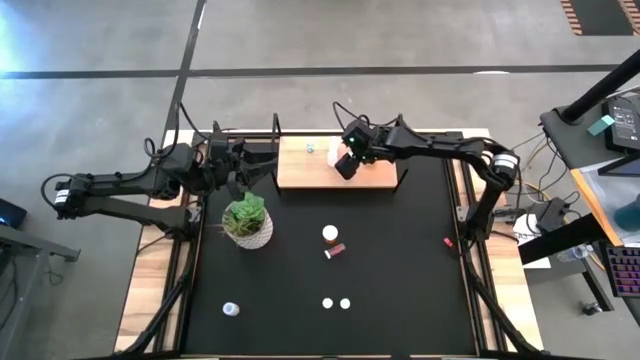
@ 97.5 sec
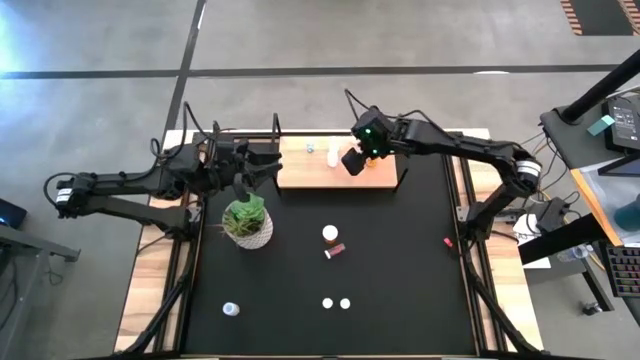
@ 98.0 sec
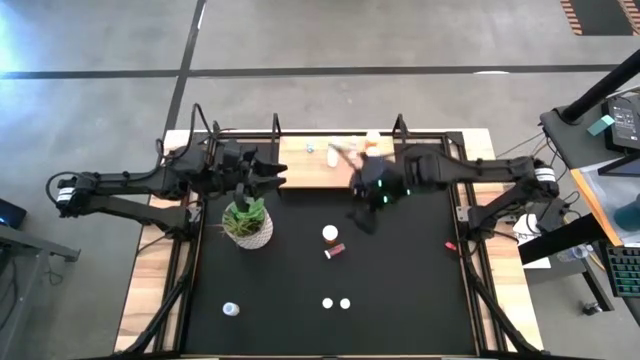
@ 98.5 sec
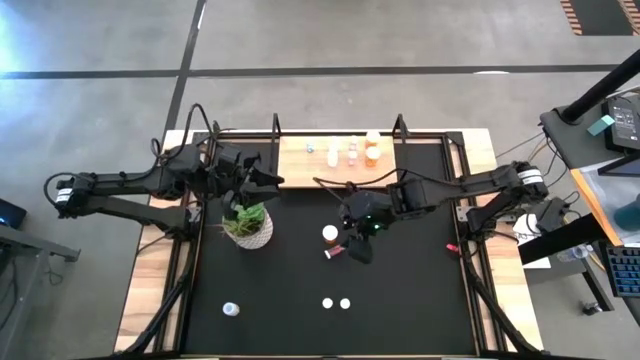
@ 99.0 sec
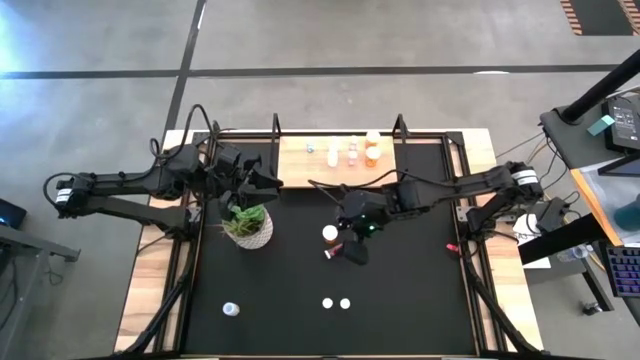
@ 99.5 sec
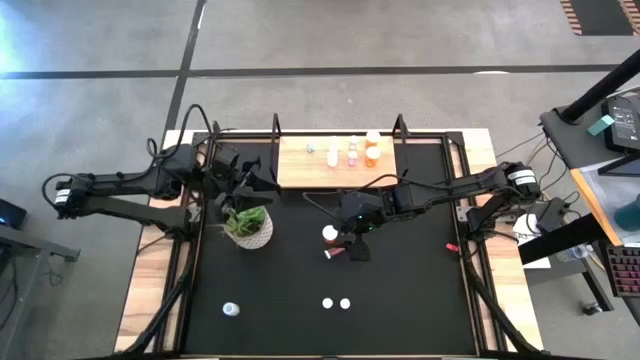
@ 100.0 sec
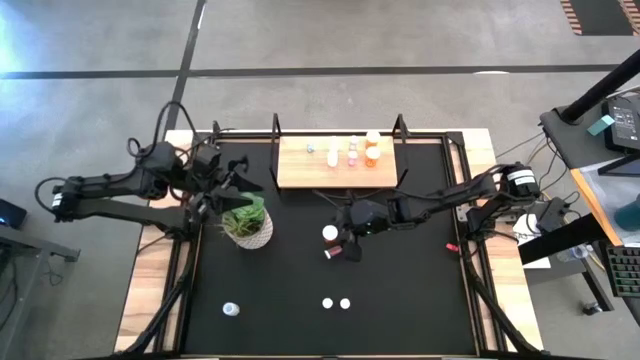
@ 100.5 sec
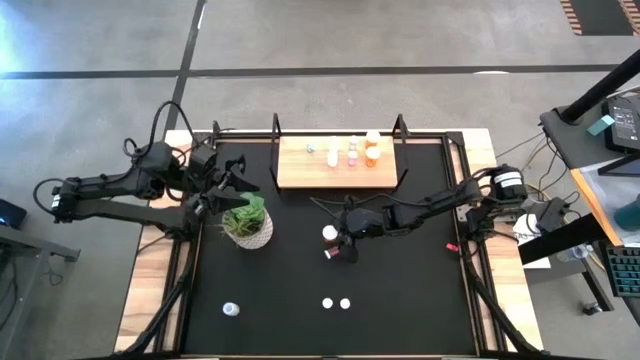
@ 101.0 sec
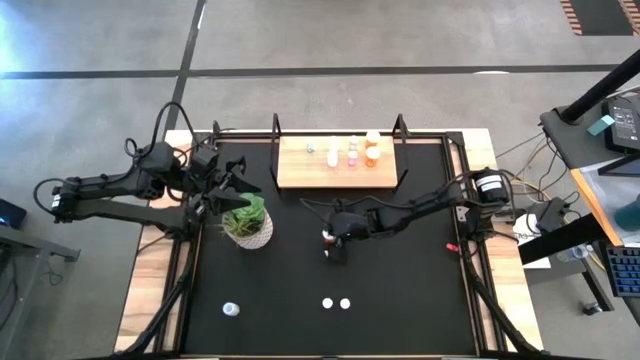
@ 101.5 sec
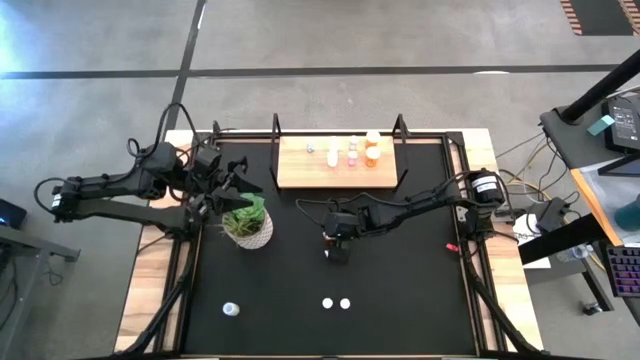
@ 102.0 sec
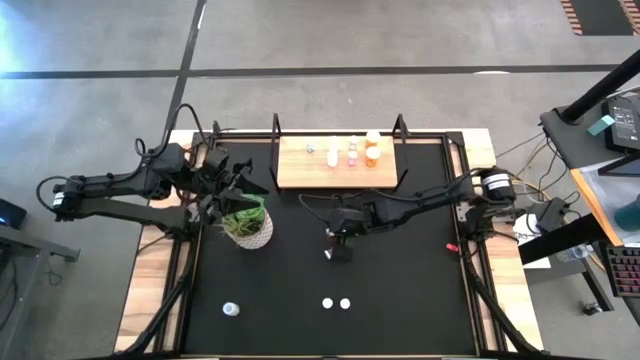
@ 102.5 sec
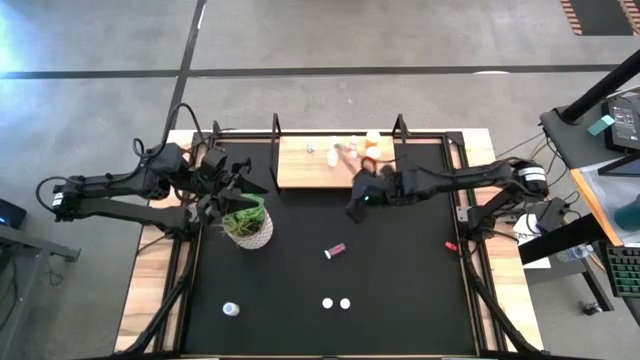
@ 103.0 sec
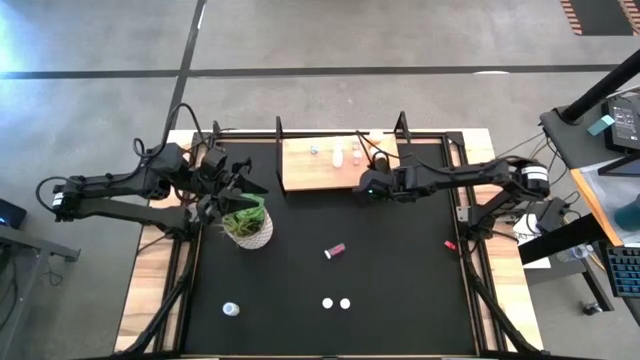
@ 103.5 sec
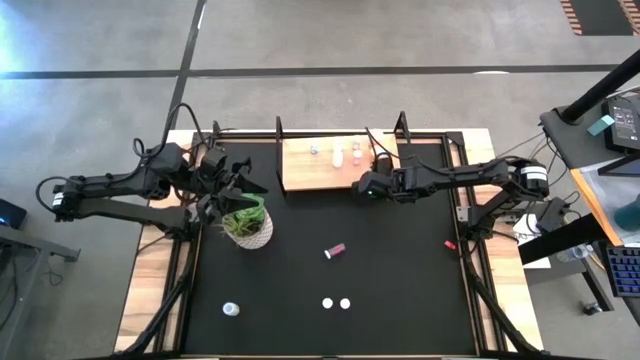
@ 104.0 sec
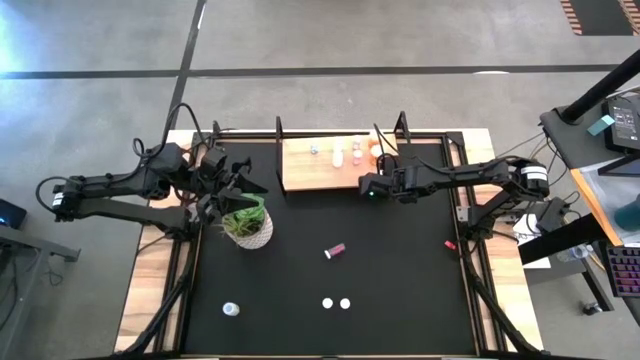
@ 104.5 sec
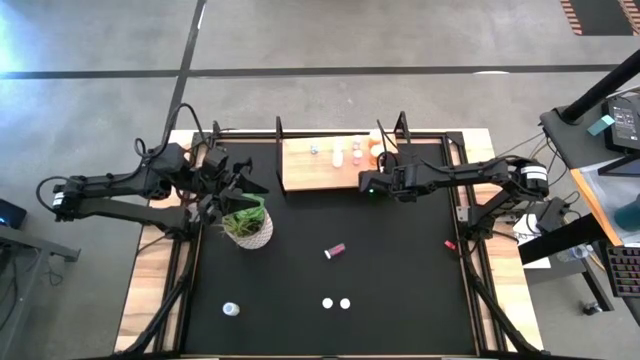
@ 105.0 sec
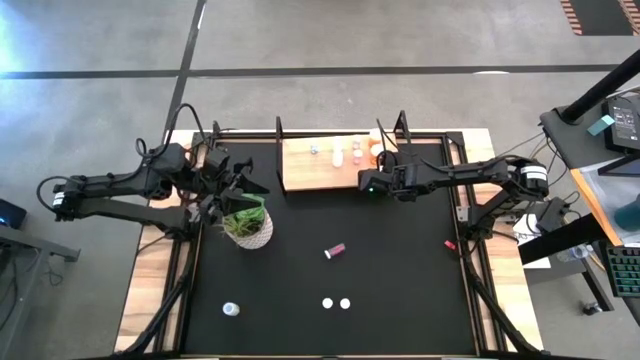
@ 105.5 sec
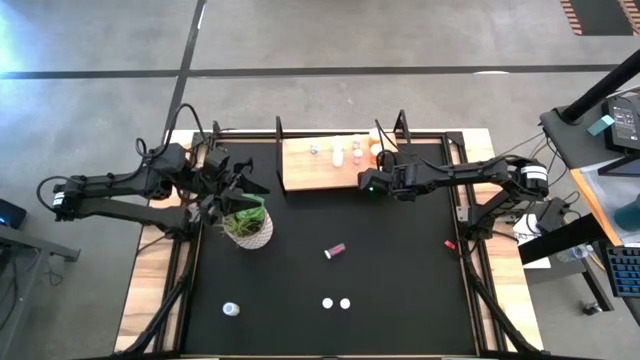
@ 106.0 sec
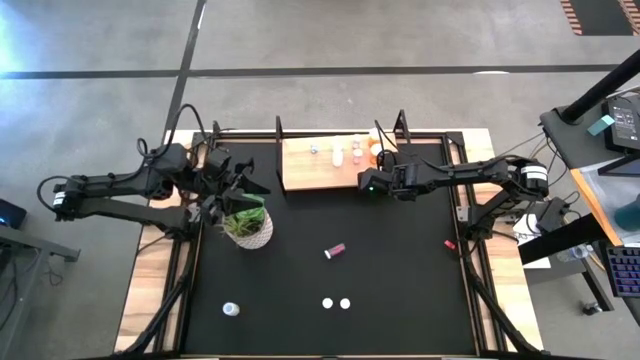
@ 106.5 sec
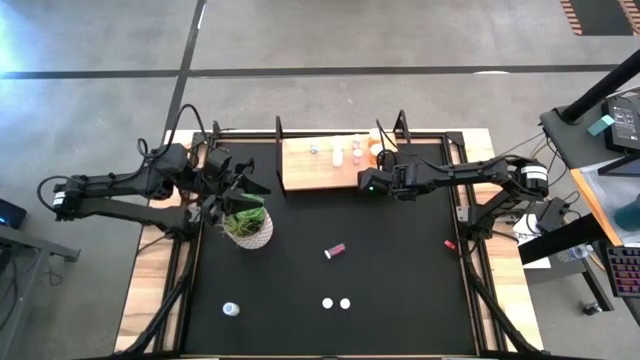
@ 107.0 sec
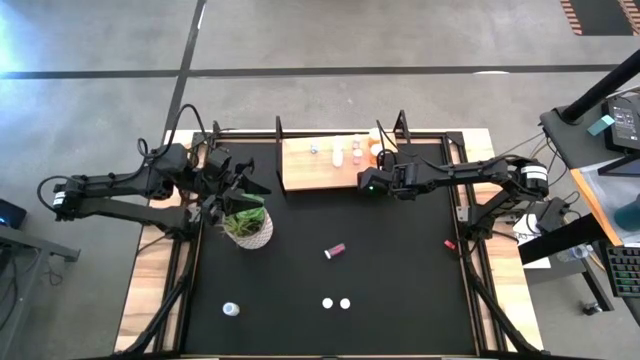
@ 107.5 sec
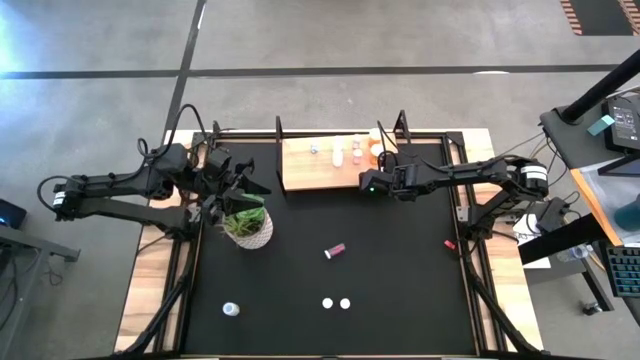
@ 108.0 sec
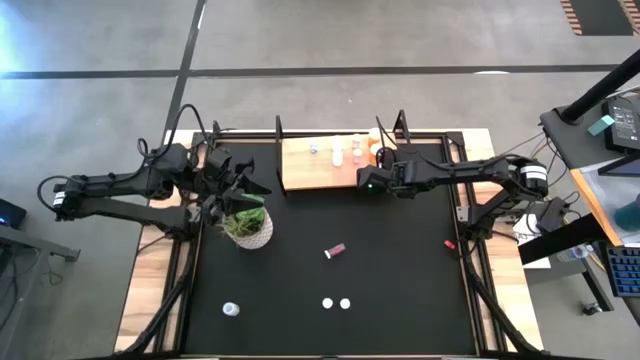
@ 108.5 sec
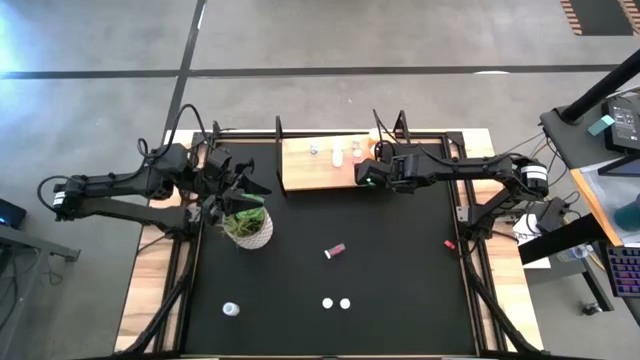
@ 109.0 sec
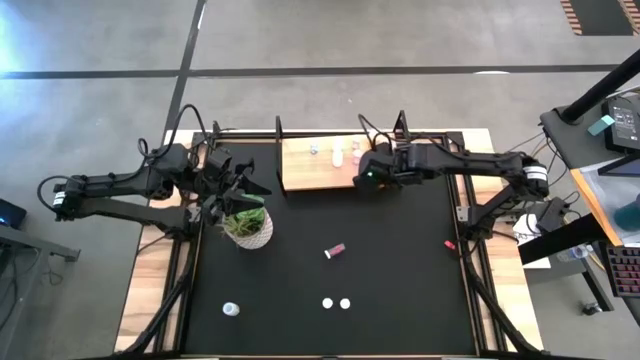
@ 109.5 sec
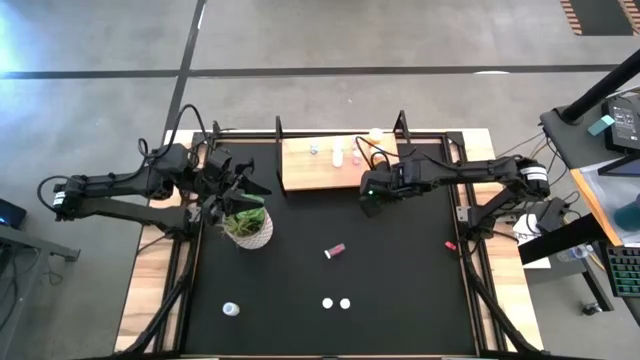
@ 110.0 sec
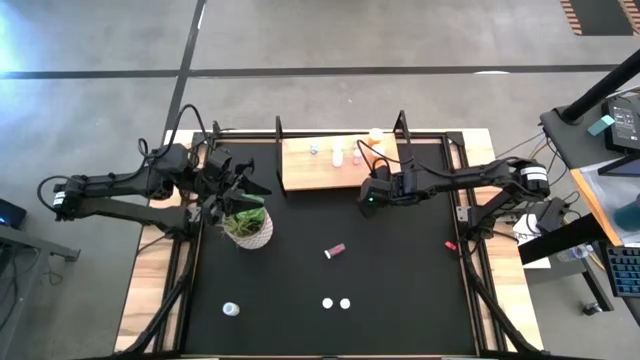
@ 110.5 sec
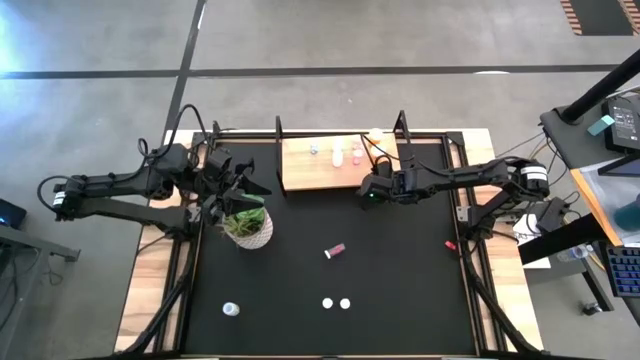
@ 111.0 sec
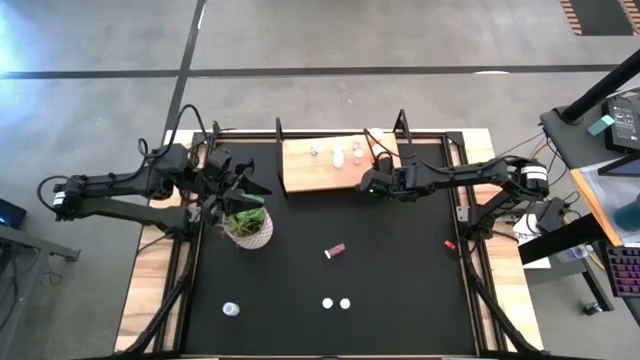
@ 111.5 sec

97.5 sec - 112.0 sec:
Task: Pick and place medicine bottles onto shelf by color
Put the orange pill bottle on the shelf aligned with the other orange pill bottles

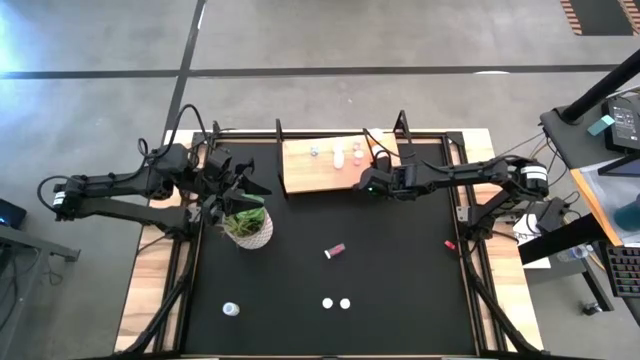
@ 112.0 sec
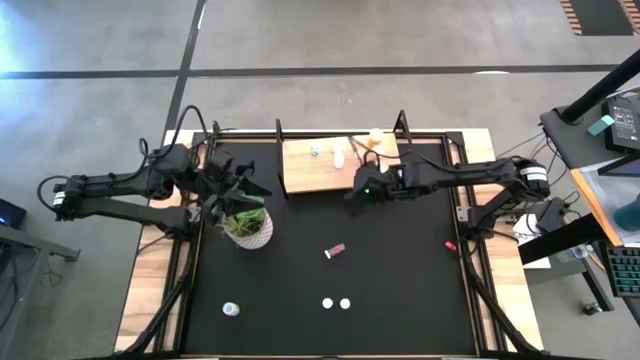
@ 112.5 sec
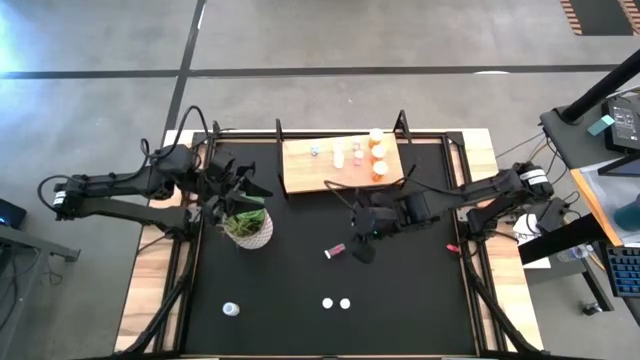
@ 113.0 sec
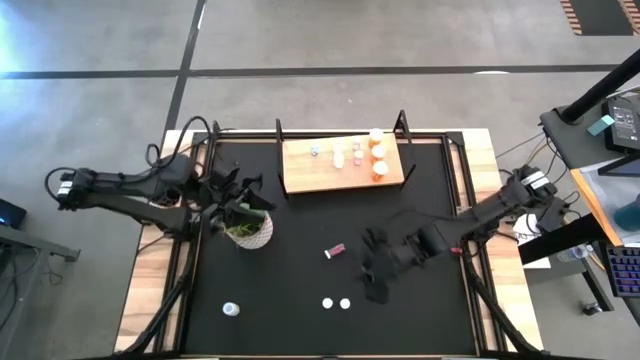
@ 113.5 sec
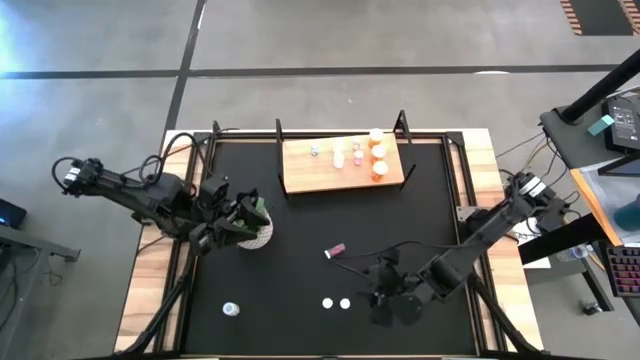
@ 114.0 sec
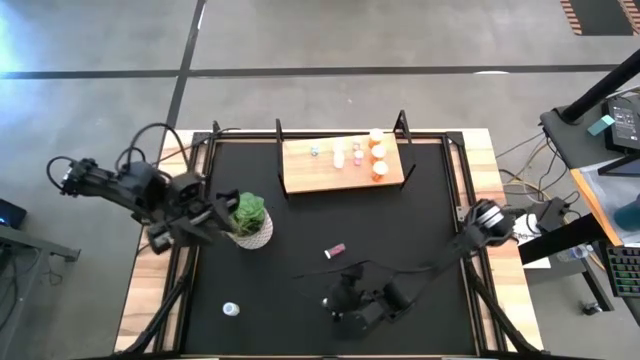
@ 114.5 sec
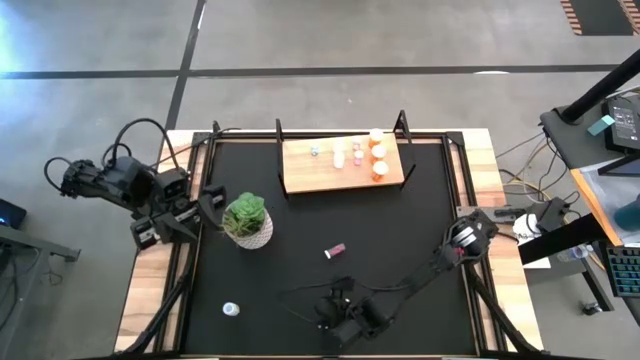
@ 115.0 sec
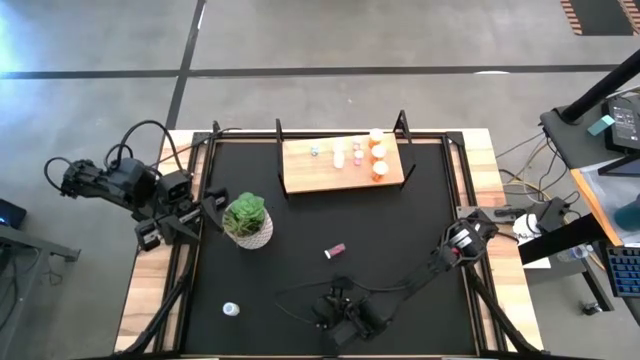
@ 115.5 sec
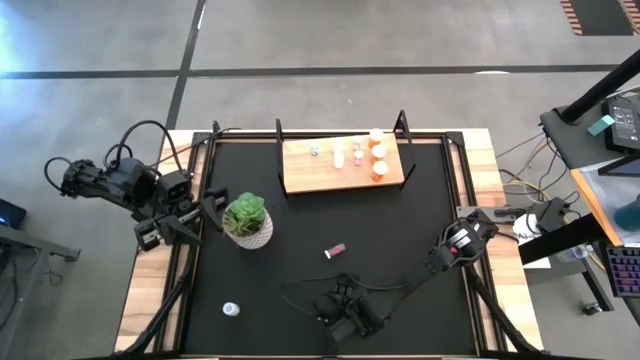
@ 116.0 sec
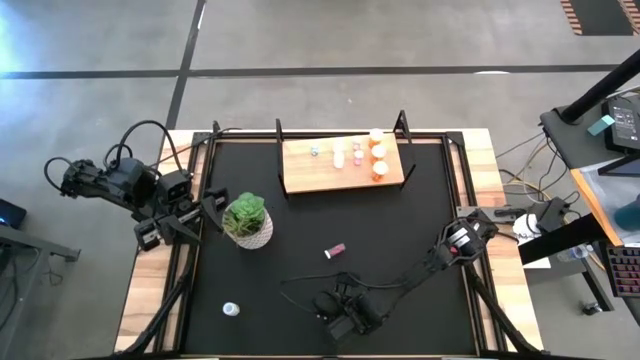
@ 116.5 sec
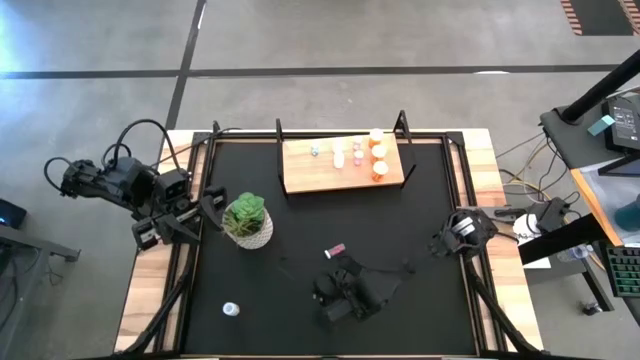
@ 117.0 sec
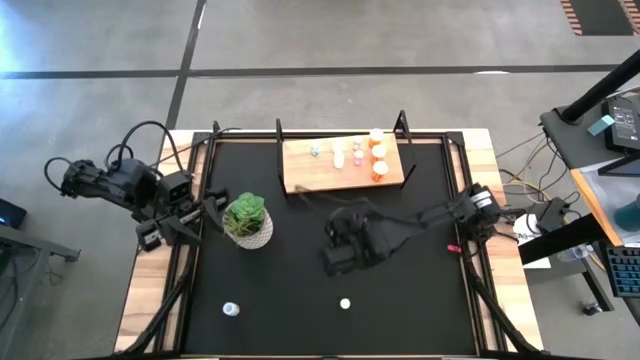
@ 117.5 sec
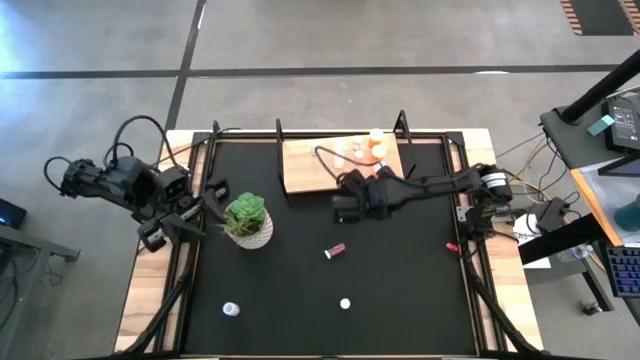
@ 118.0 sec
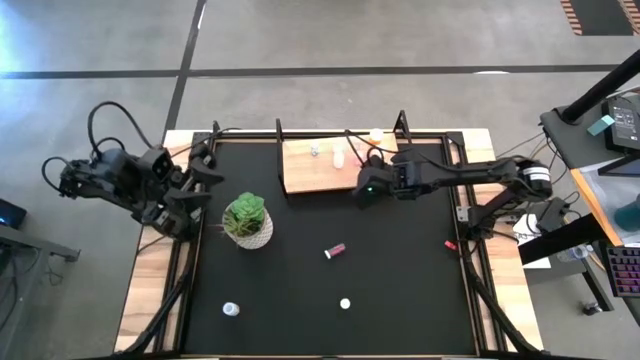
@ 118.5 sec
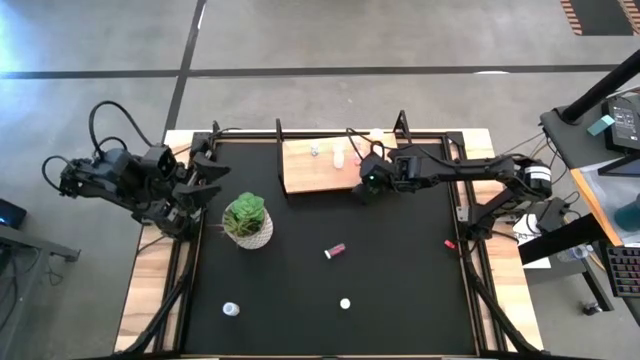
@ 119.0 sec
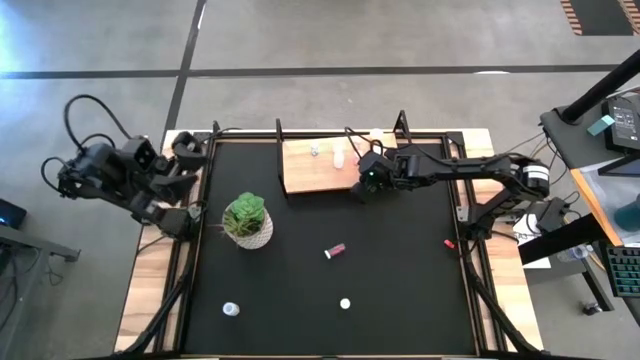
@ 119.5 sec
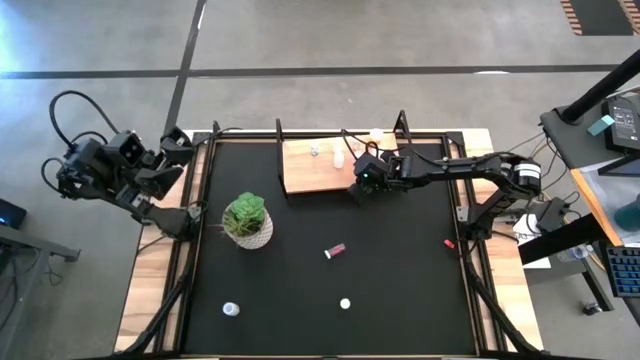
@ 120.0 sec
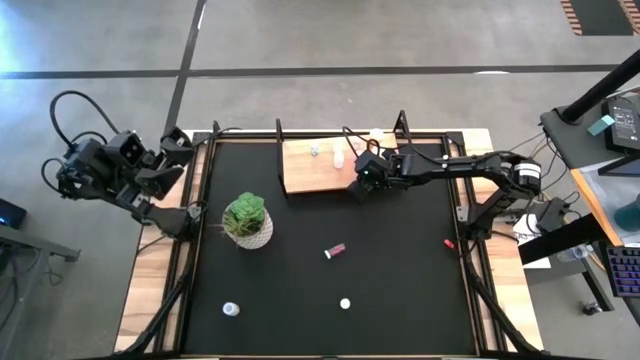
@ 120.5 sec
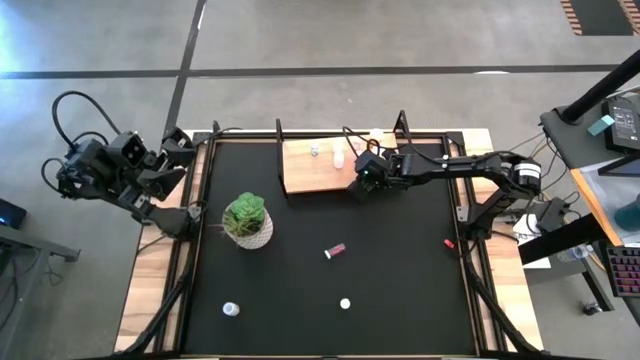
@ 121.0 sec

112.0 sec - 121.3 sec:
Put the pink pill bottle on the shelf aligned with the other pink pill bottles
